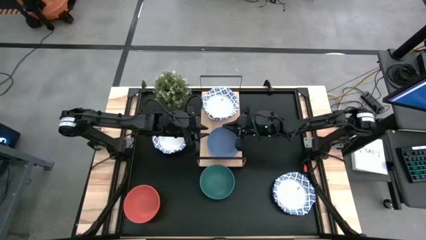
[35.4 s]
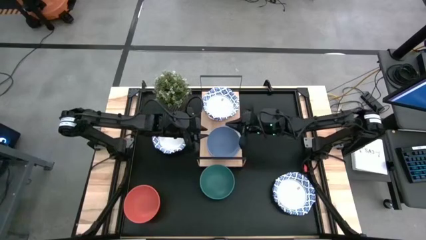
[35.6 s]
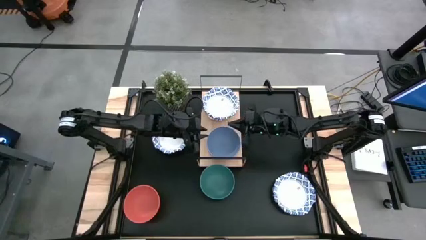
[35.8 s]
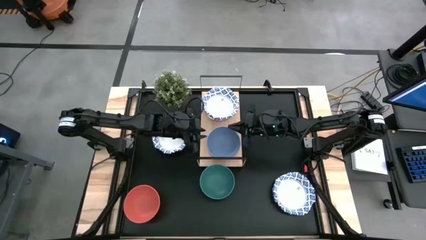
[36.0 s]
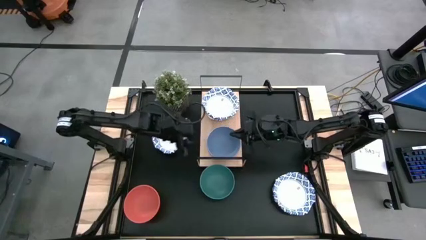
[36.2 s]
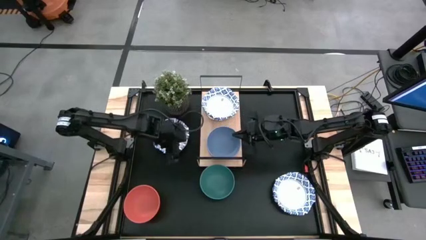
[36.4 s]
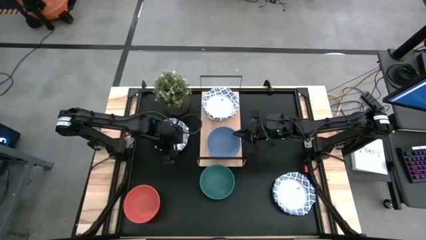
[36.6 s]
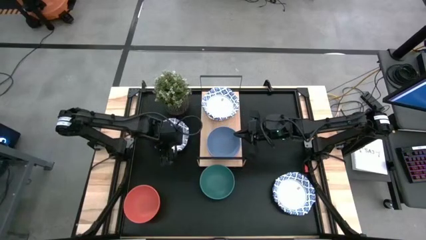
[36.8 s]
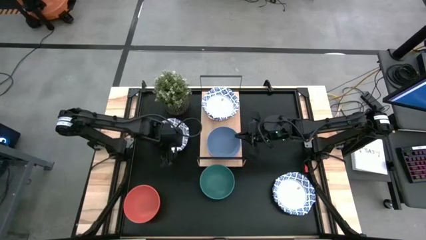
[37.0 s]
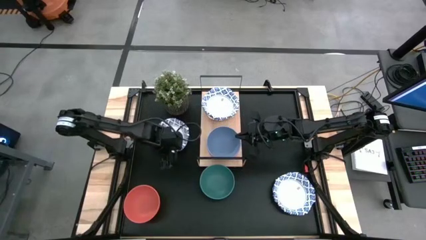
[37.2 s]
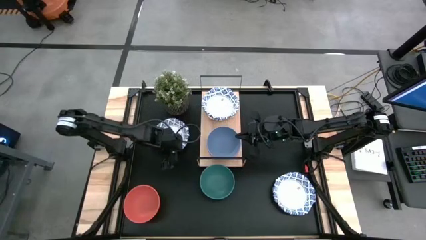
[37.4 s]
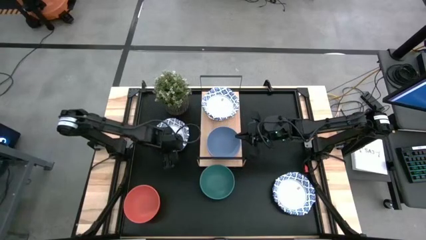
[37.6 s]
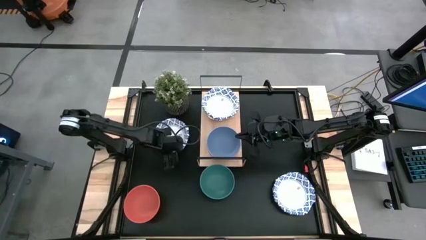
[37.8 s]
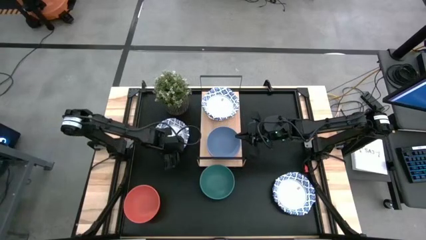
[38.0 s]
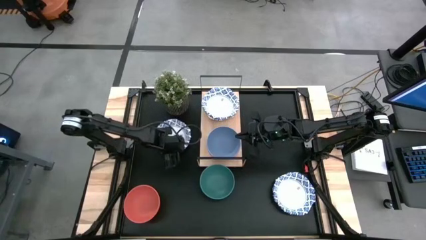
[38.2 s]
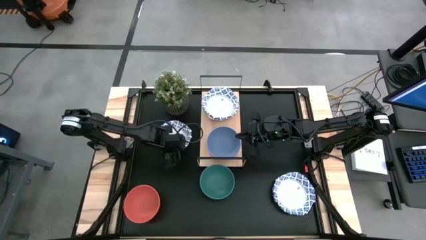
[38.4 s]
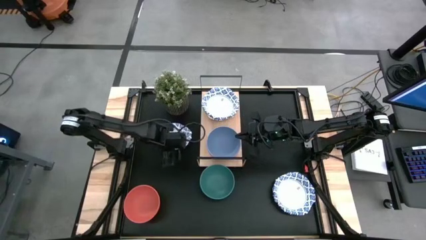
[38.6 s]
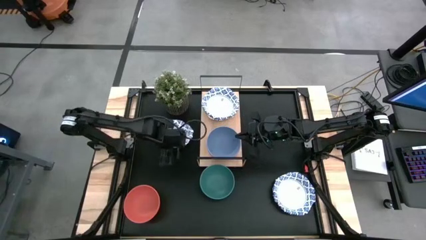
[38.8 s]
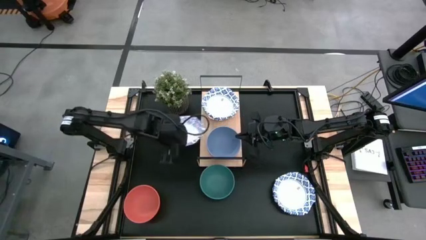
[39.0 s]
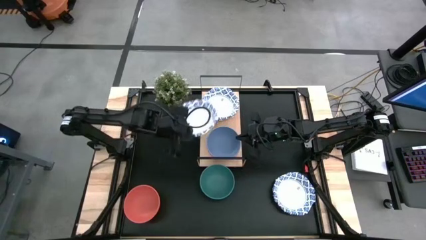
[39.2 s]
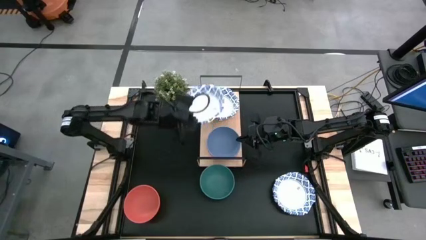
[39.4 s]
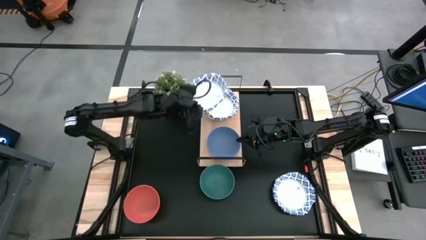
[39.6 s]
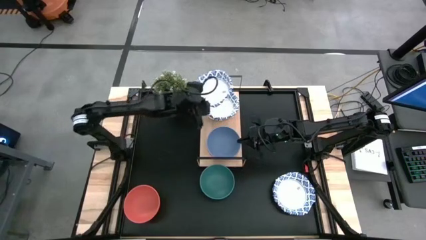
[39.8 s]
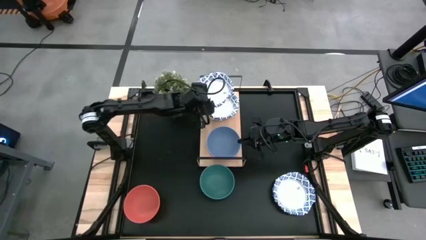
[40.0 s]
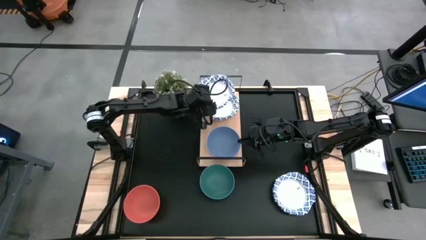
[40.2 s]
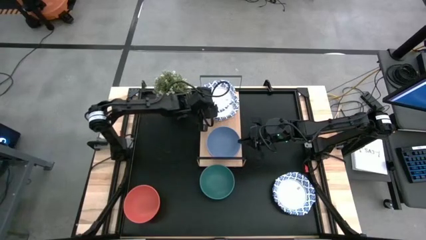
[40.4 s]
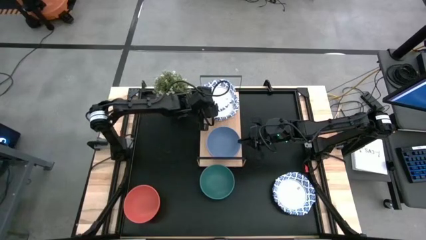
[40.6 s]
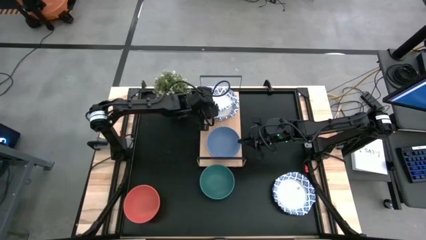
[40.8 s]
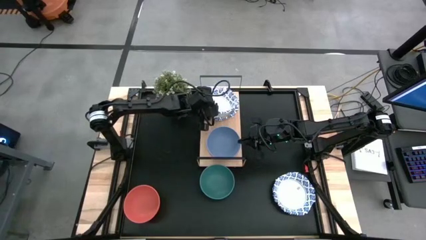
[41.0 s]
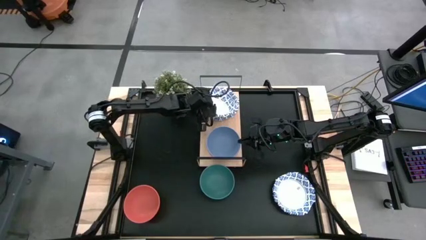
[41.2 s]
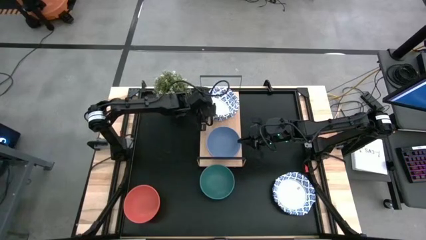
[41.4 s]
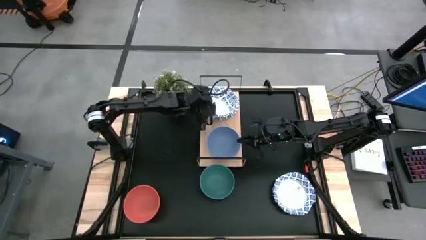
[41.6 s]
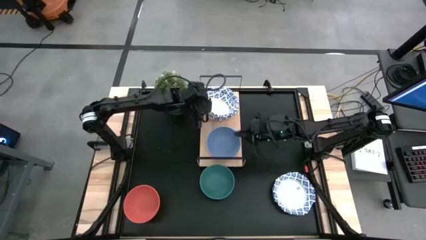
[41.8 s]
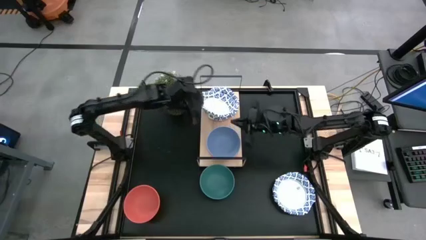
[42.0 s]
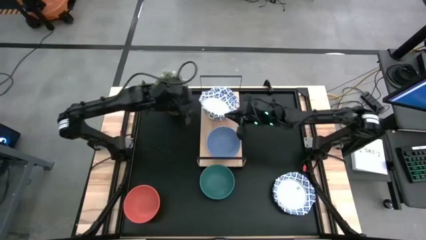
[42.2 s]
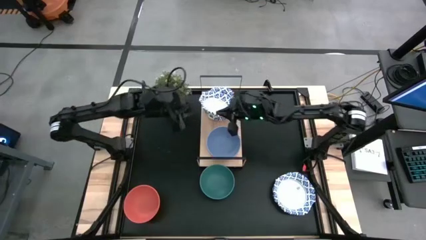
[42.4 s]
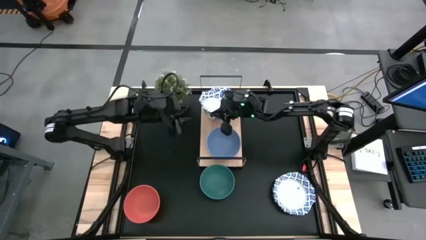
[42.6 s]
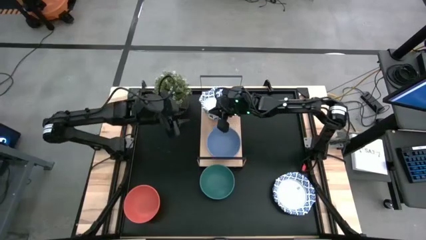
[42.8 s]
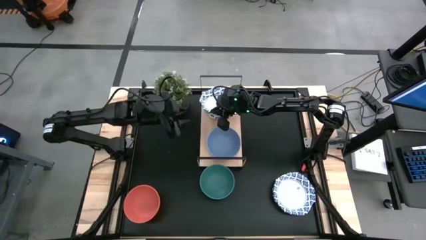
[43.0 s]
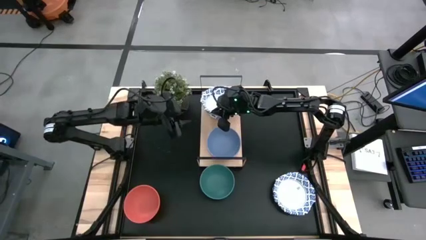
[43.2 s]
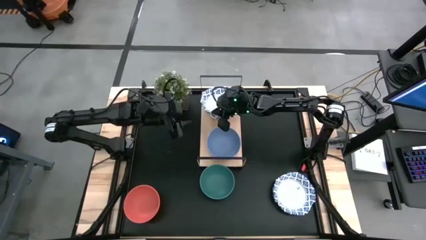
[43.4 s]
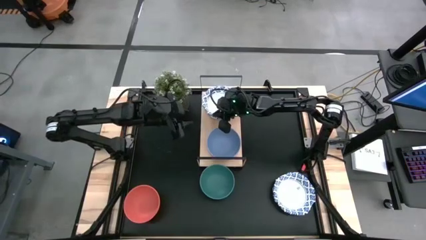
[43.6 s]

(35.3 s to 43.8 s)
Task: Place and stack bowls onto a shelf
Stack the white paper bowl on top of the white paper bowl on the shelf

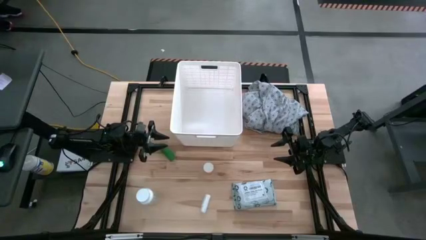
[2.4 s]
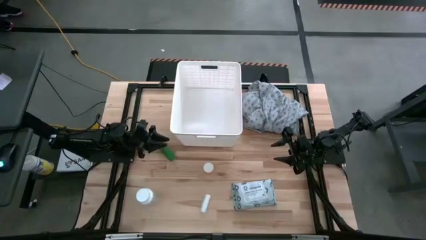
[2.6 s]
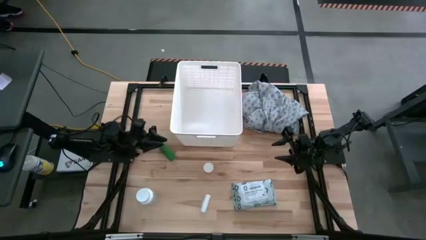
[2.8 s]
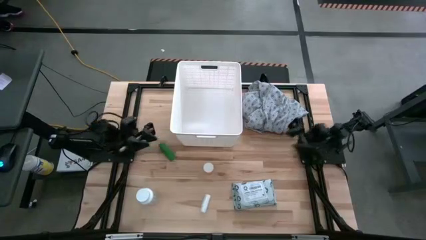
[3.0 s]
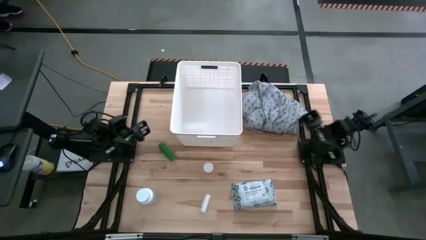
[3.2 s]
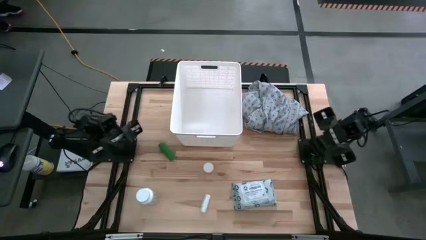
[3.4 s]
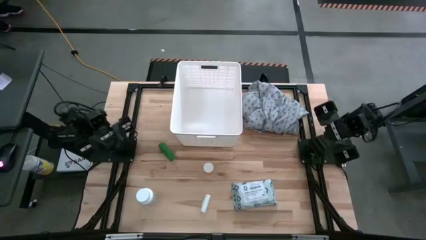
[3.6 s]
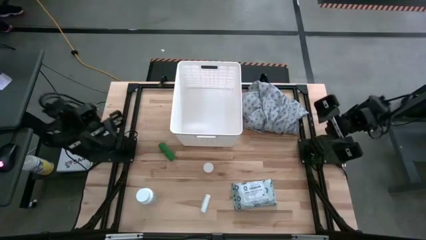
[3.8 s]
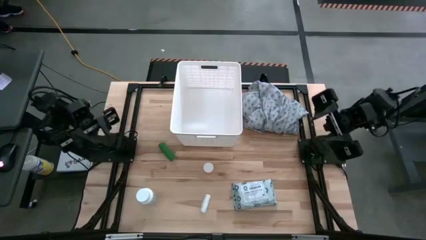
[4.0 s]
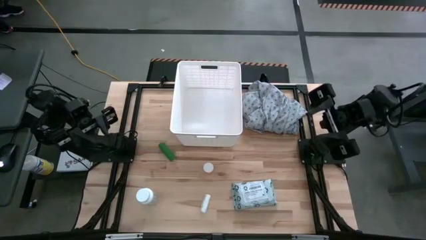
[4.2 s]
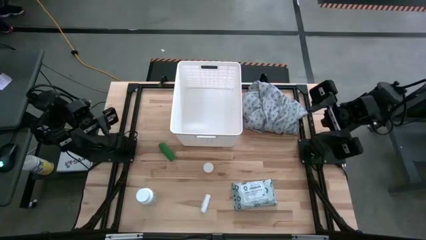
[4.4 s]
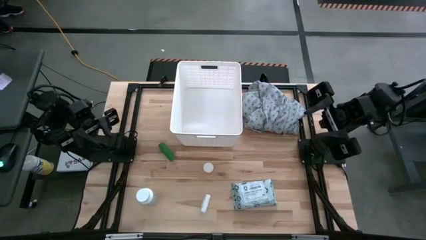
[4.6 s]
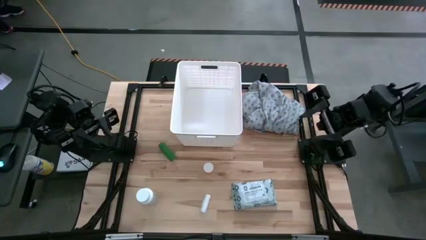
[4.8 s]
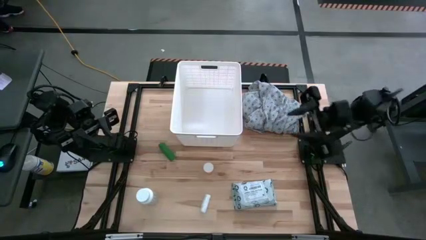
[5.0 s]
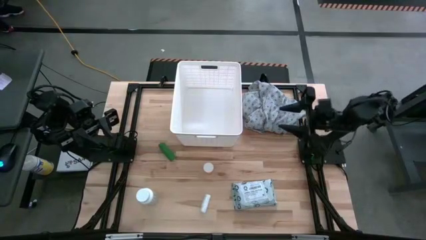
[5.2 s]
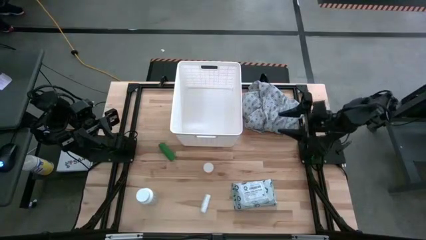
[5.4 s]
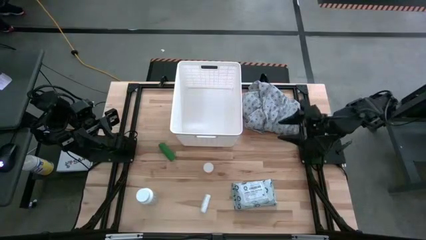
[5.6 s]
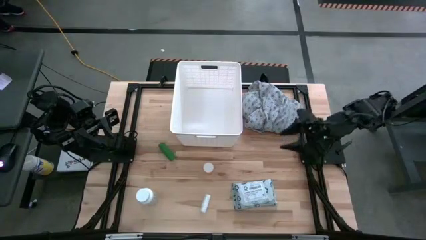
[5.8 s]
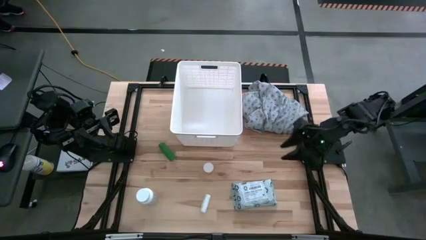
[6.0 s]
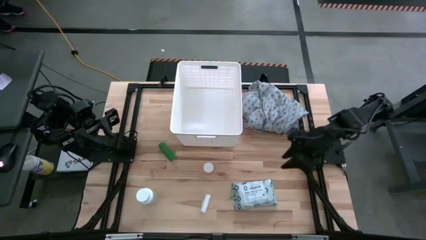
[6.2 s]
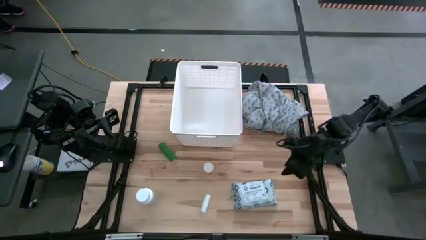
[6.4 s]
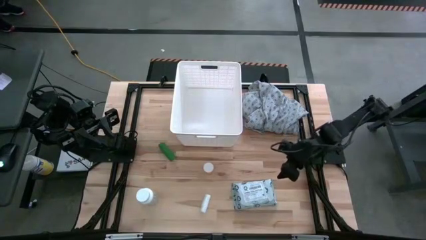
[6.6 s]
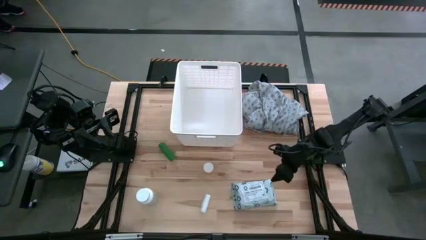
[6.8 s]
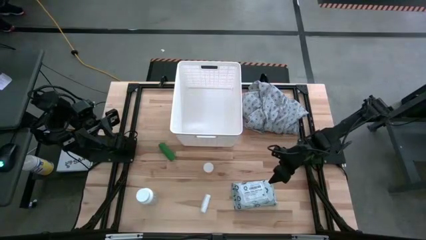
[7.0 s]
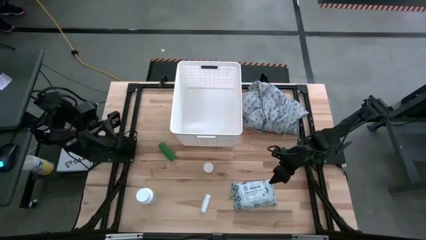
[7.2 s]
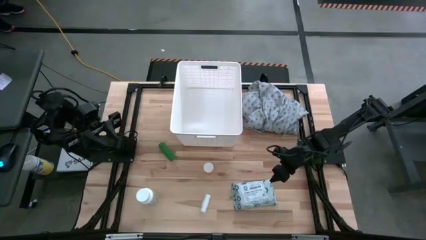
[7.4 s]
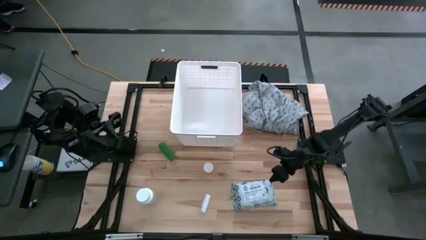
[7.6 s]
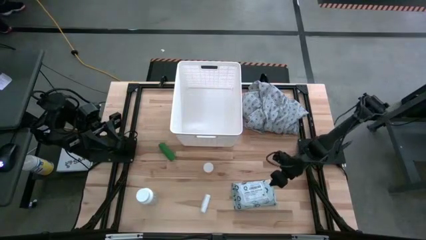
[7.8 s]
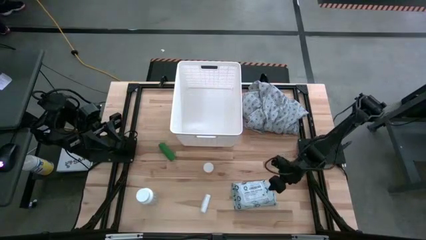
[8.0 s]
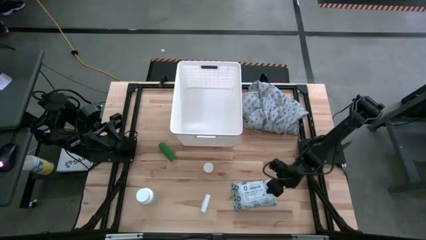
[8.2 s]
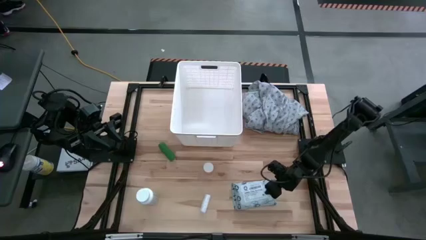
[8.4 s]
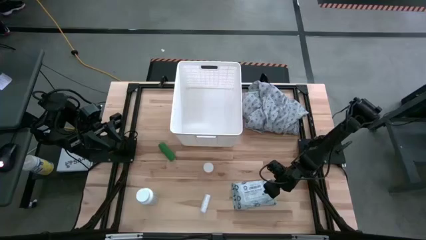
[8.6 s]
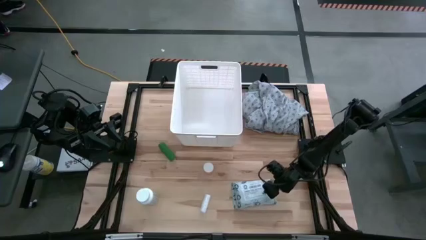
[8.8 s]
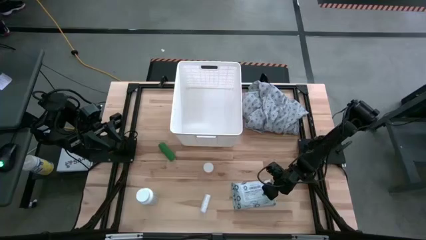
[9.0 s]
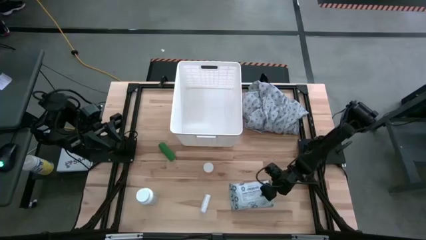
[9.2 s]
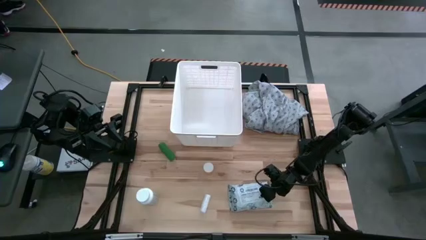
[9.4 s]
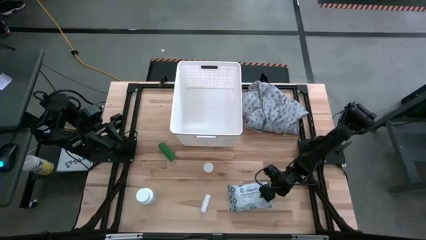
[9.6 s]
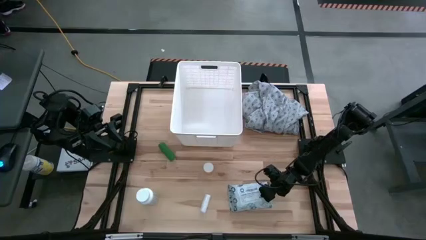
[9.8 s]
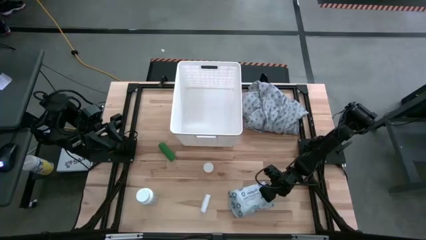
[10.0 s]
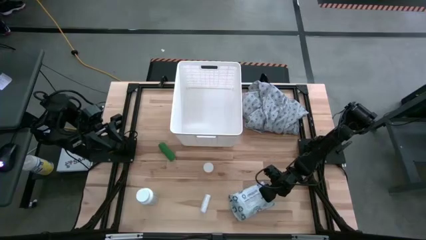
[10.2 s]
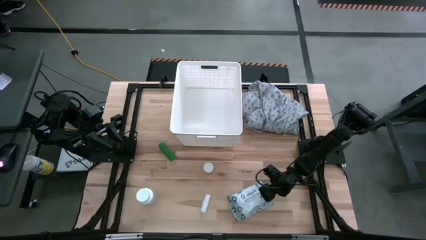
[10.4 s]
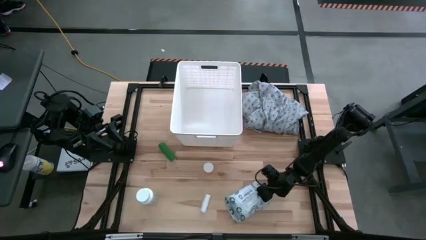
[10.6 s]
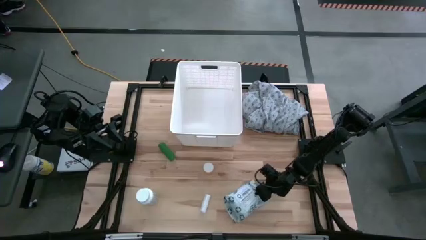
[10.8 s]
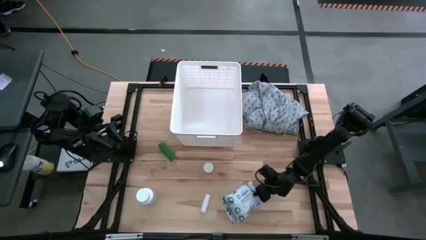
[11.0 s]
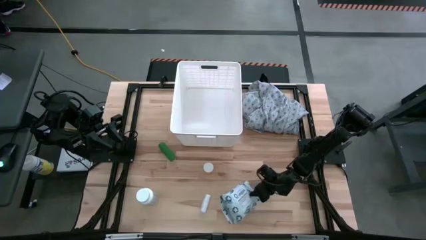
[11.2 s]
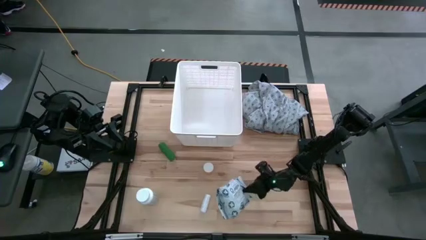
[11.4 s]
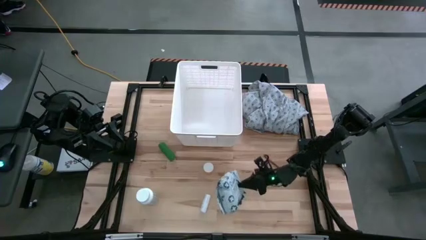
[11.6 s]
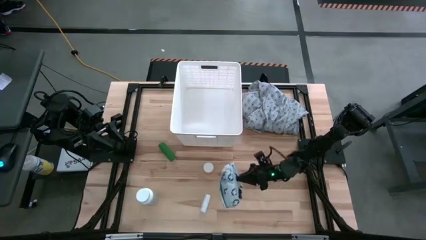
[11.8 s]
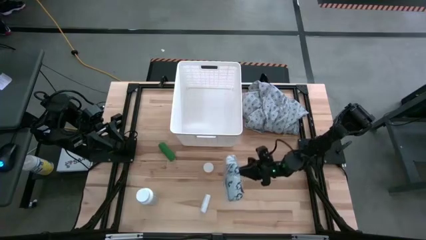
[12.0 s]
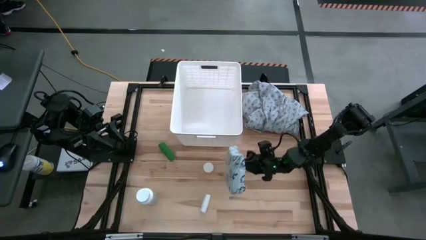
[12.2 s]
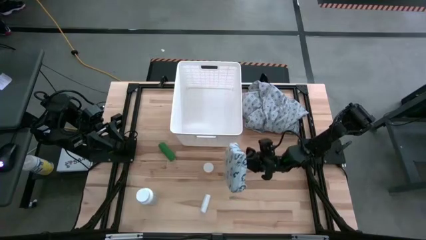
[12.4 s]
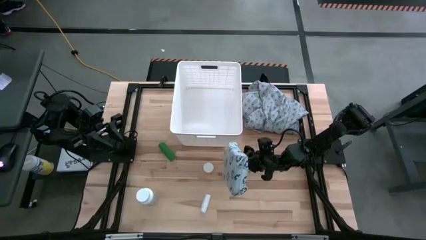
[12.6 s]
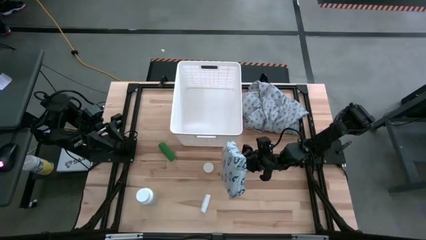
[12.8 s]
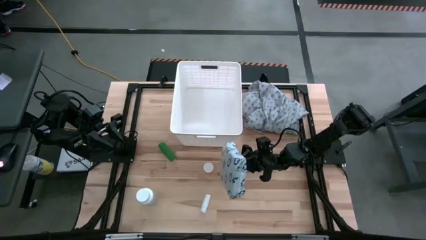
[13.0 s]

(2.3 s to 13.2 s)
Task: Pick & place medical supplies in basket/bin
Put the mailer bag into the white laundry organizer
